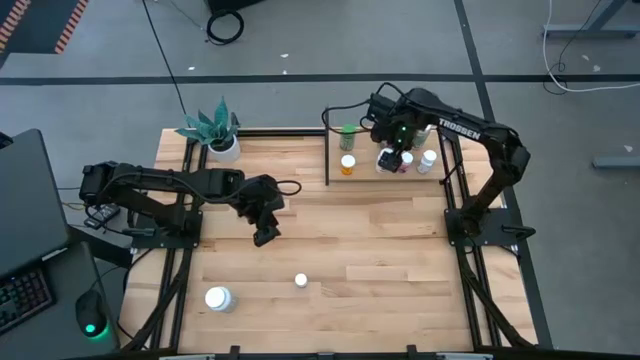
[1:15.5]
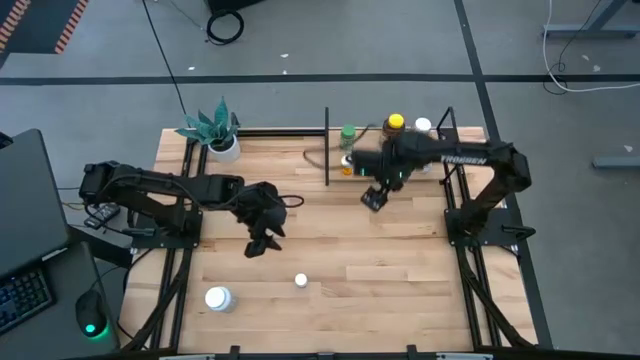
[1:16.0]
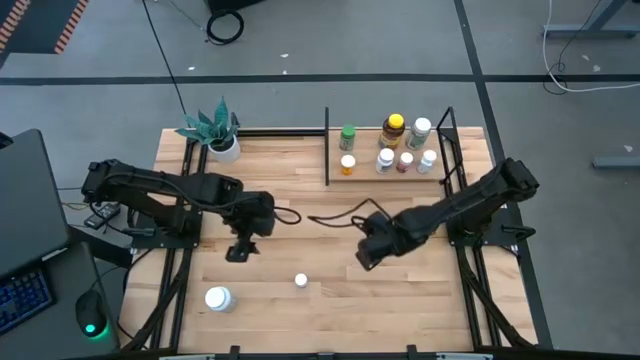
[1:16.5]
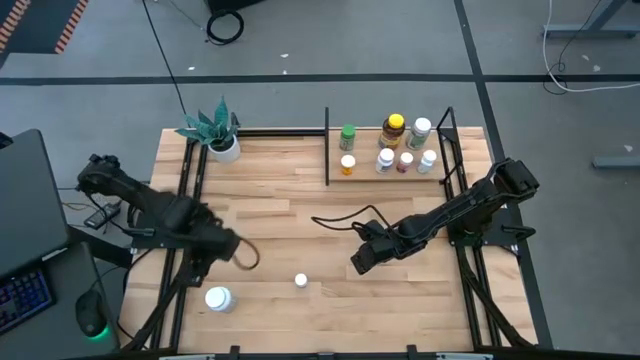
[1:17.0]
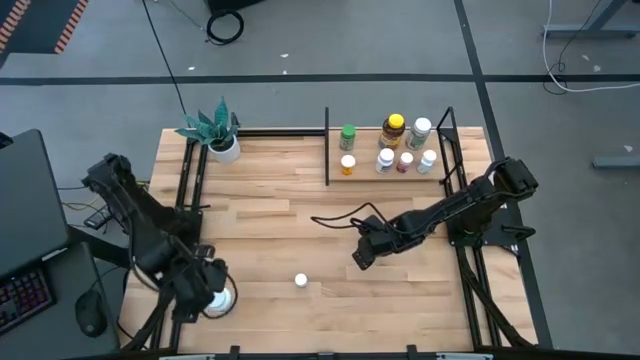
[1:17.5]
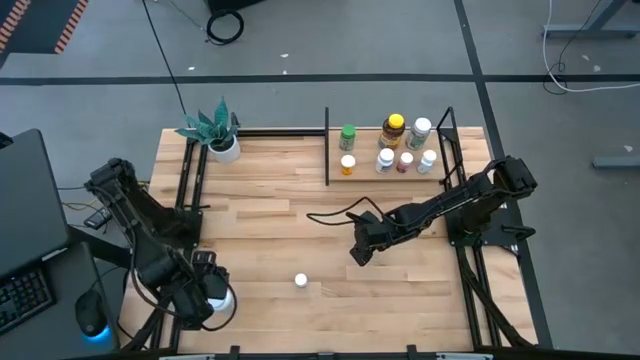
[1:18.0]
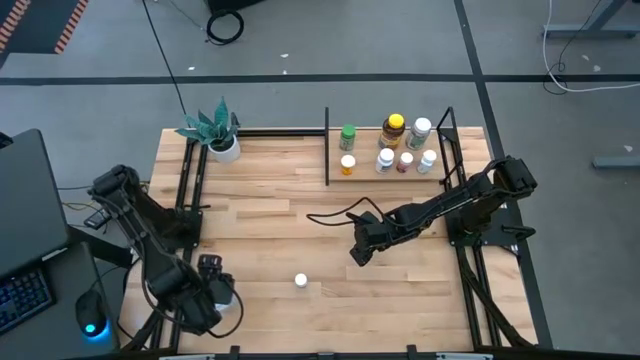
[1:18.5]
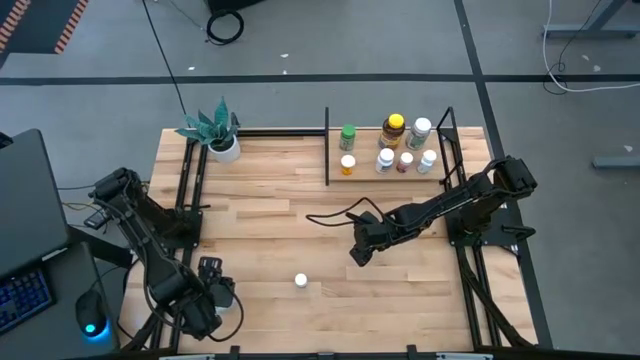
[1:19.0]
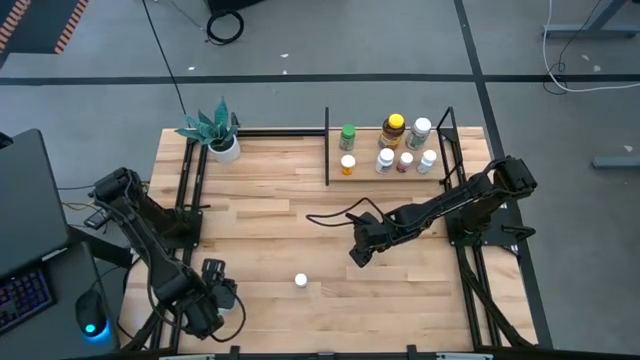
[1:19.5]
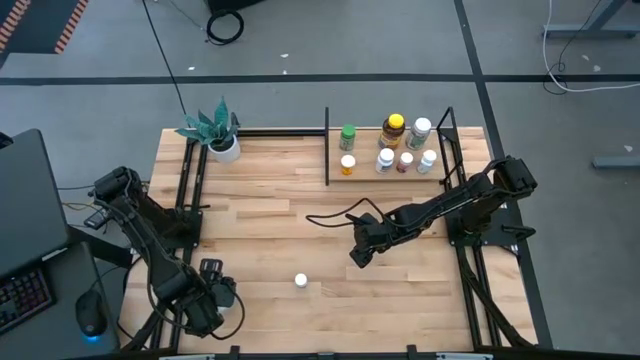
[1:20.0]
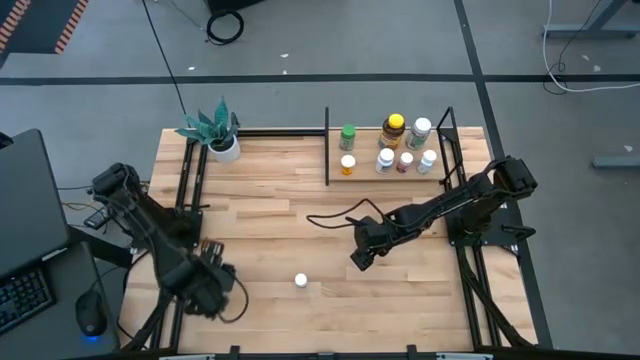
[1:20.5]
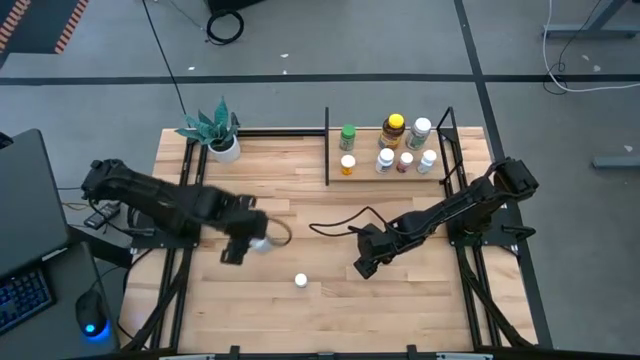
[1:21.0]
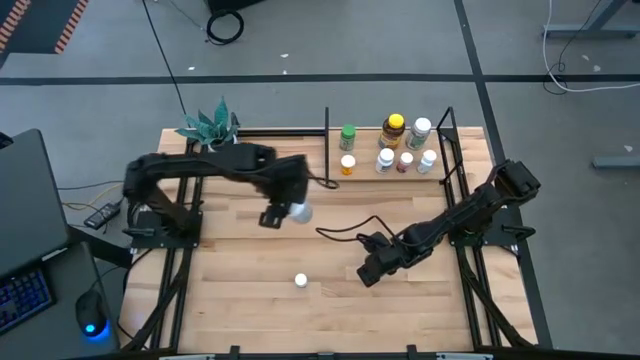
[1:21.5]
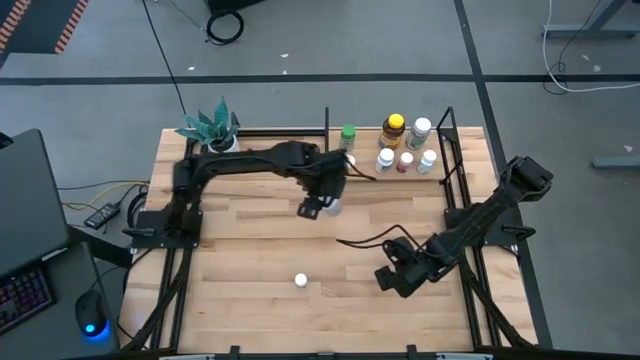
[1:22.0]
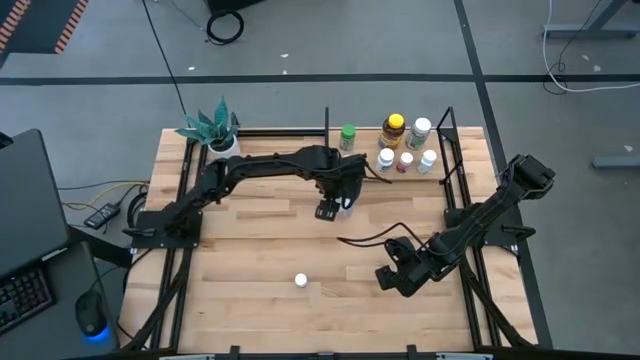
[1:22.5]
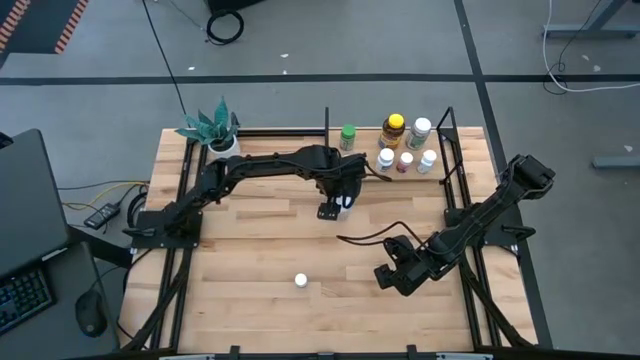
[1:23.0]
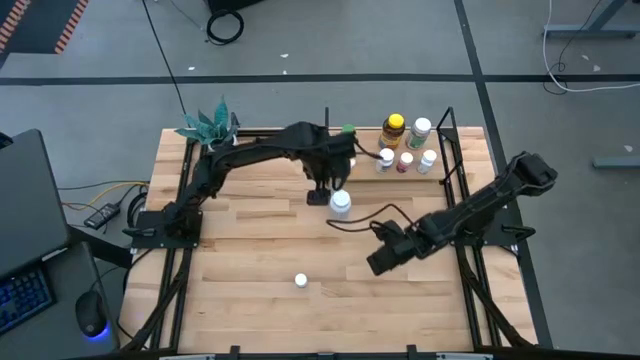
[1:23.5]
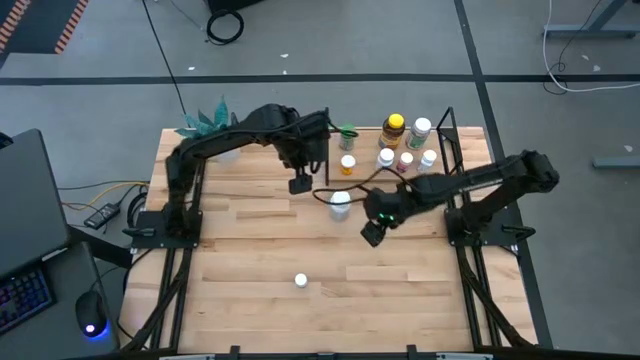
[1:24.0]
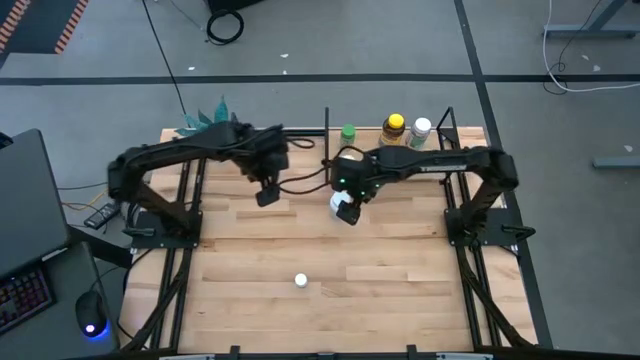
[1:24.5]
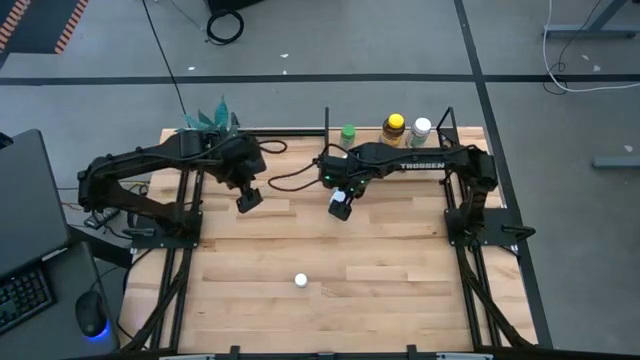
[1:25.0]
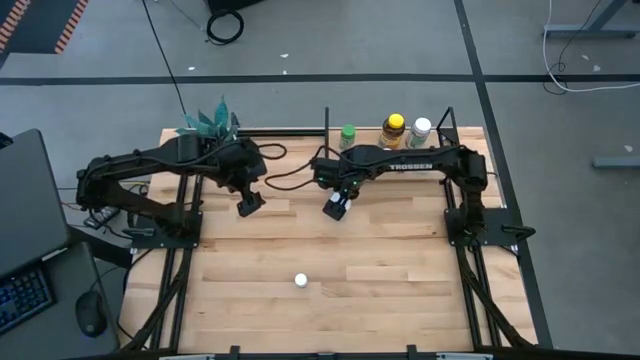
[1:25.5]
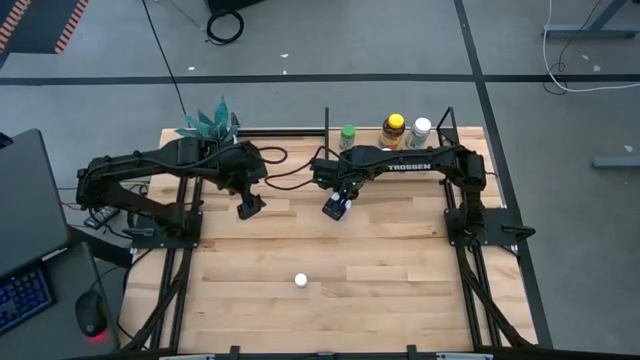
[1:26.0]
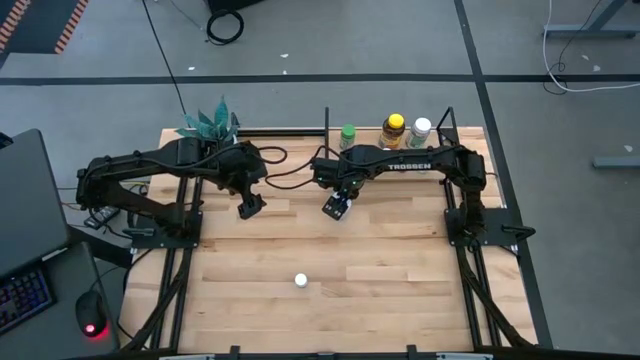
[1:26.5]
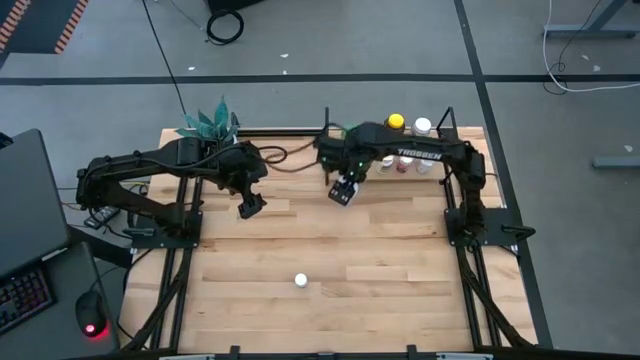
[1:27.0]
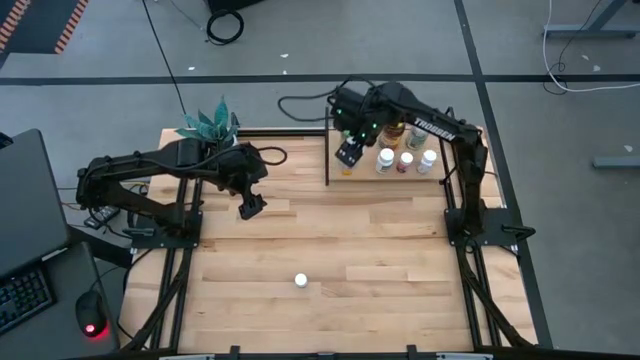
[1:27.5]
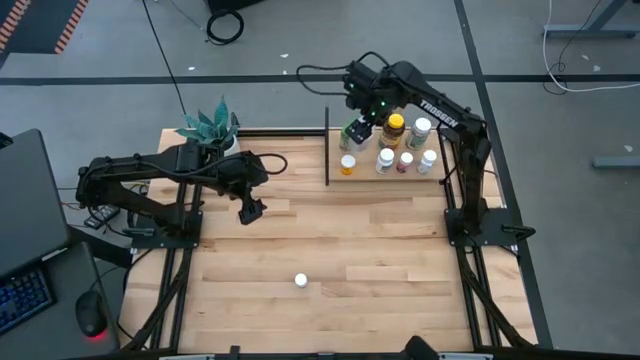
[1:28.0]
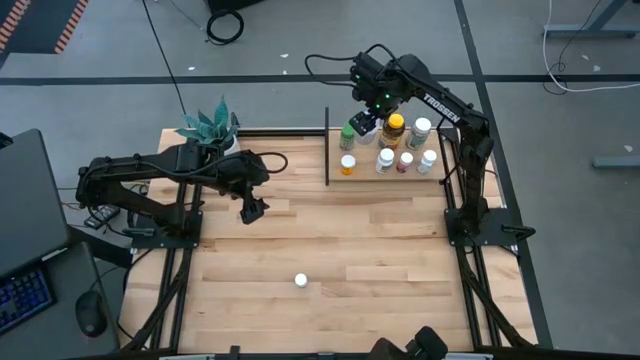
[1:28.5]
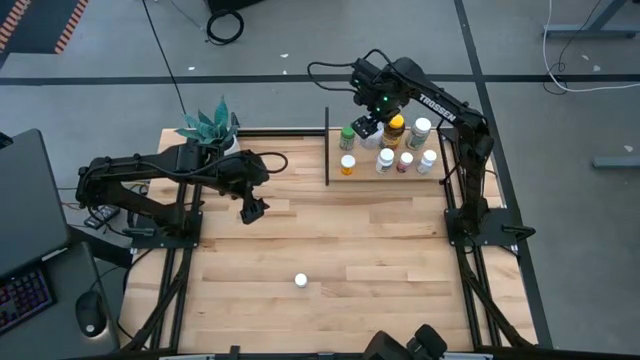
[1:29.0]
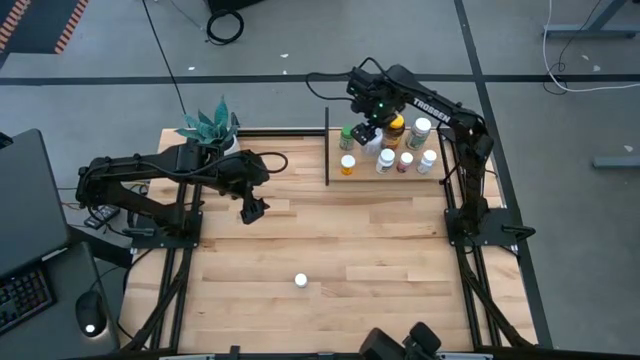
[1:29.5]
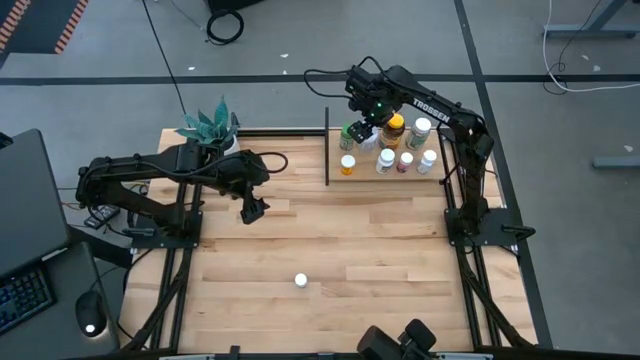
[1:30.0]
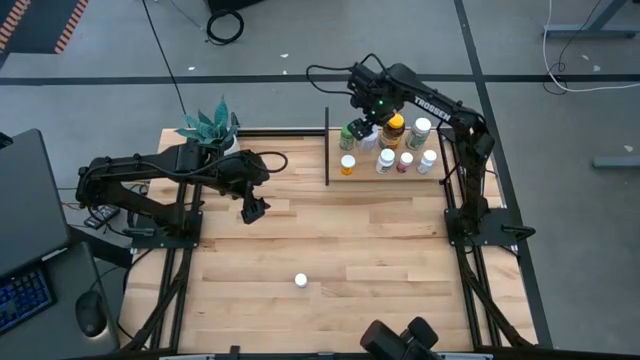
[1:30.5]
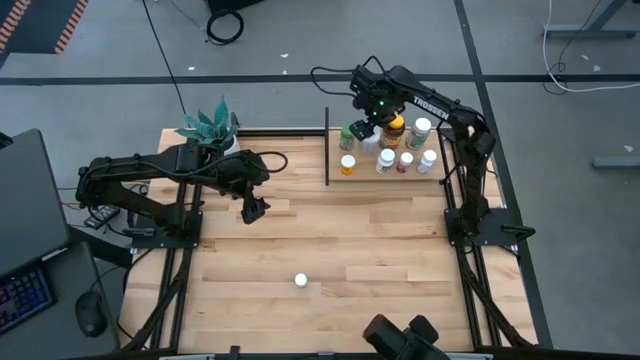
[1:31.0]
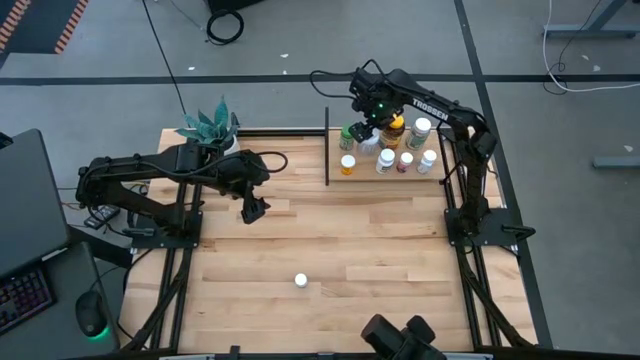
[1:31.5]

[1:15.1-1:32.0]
Task: Pick and place medicine bottles onto shelf by color
Put the red pill bottle on the shelf

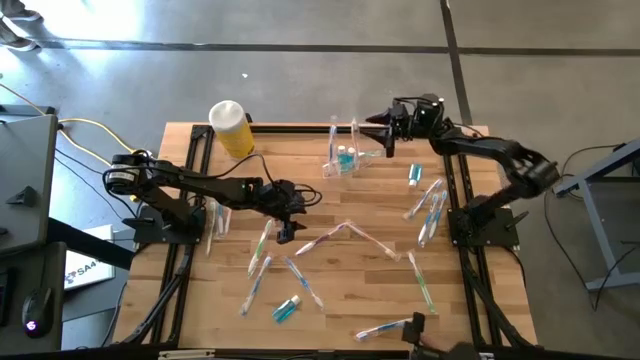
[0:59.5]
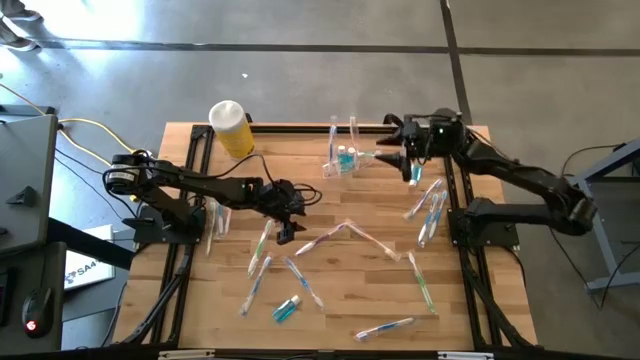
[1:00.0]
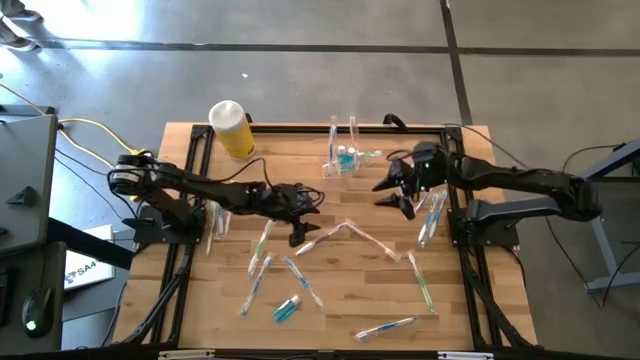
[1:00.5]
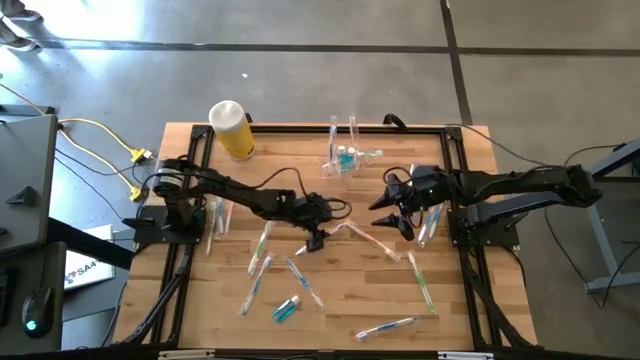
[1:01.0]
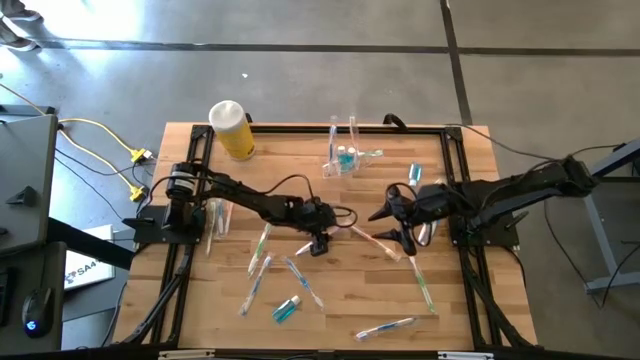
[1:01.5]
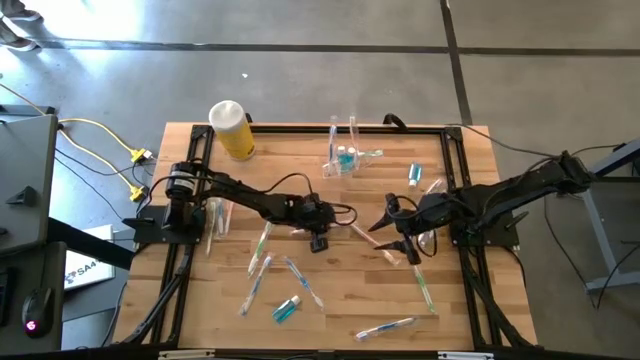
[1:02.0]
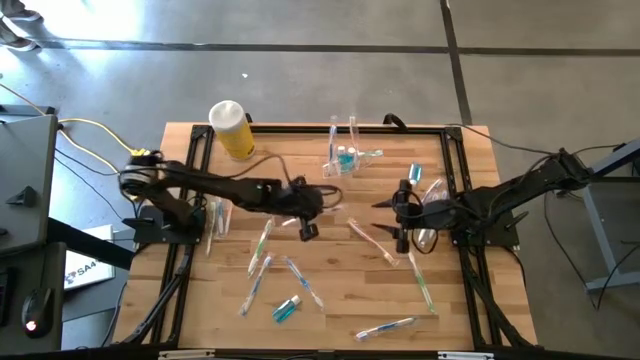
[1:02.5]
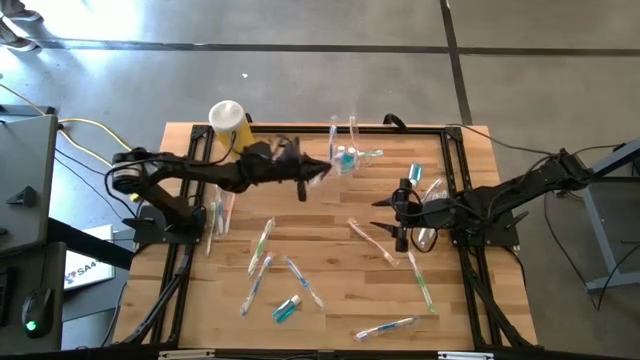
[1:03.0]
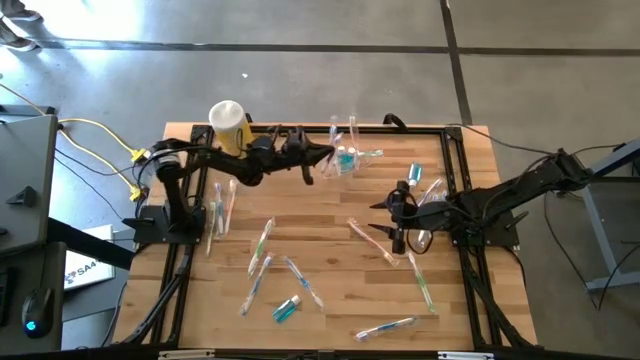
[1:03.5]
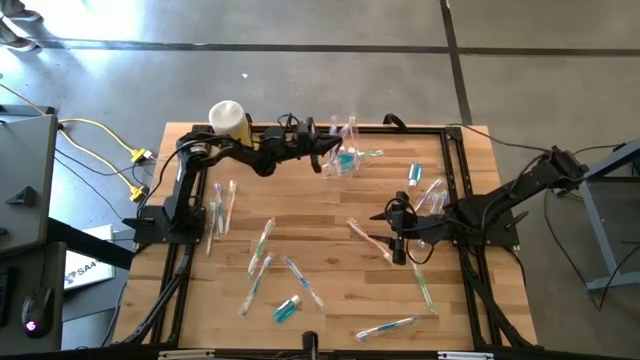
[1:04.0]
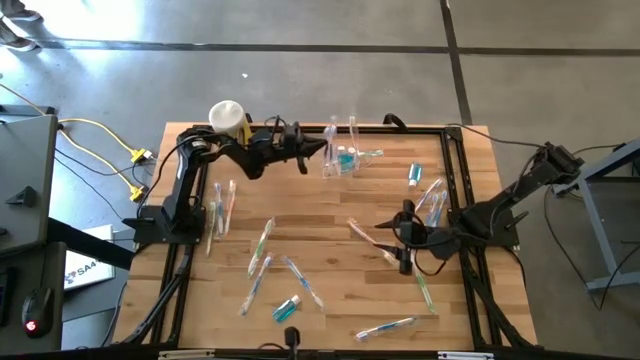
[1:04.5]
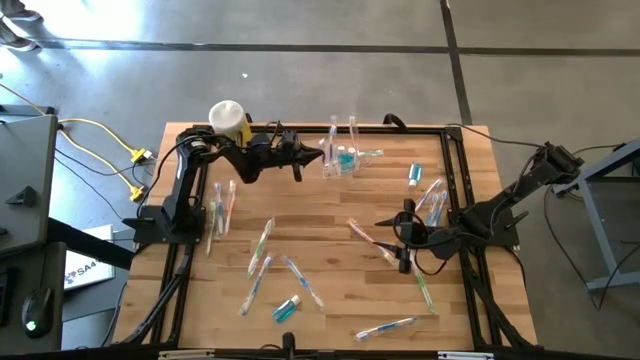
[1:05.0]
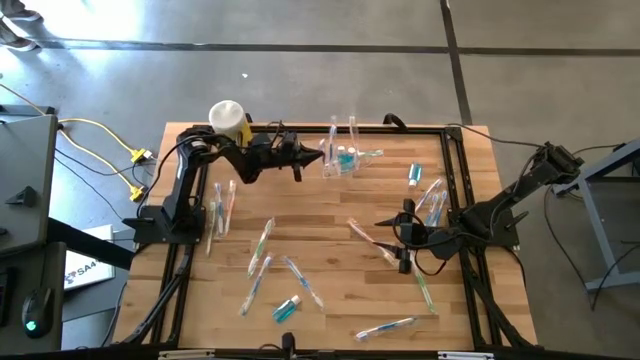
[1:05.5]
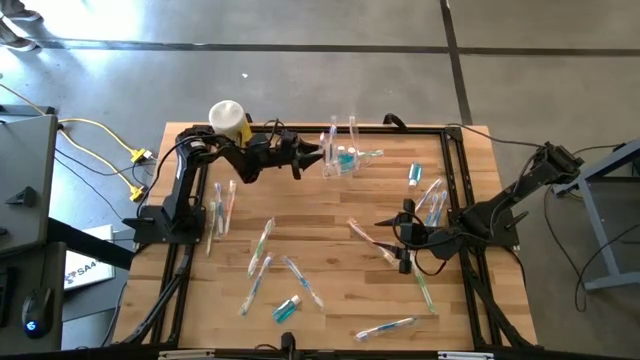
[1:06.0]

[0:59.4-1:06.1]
Task: Pick & Place toothbrushing station
Put the purple toothbrush into the transparent organizer
